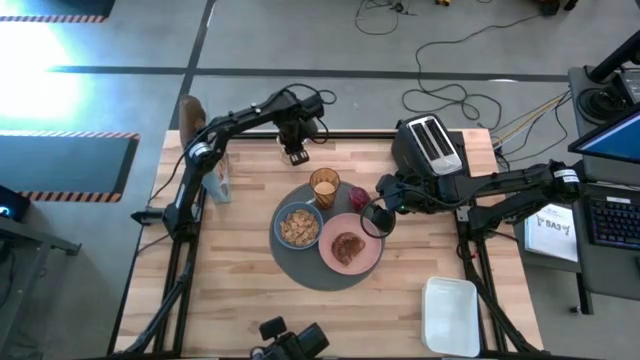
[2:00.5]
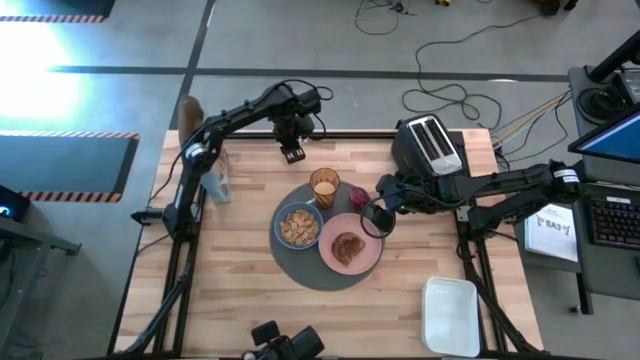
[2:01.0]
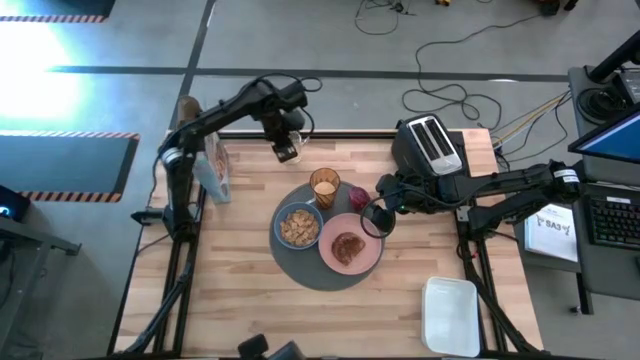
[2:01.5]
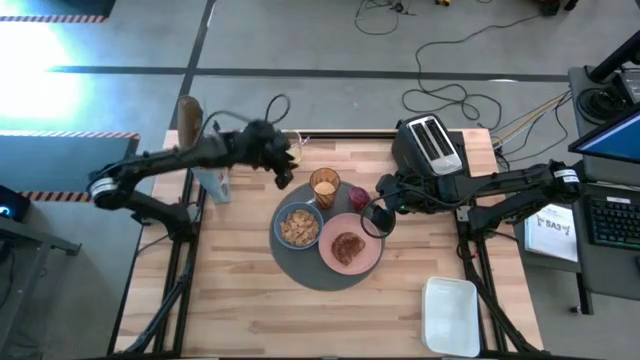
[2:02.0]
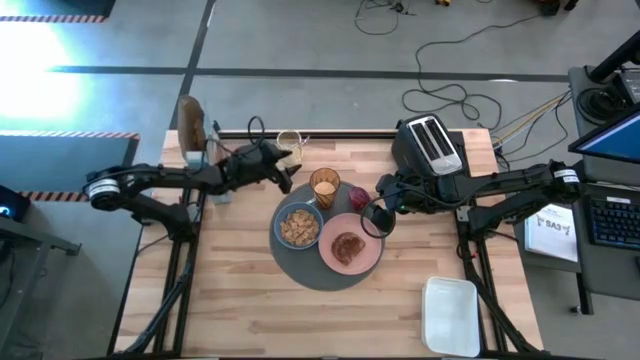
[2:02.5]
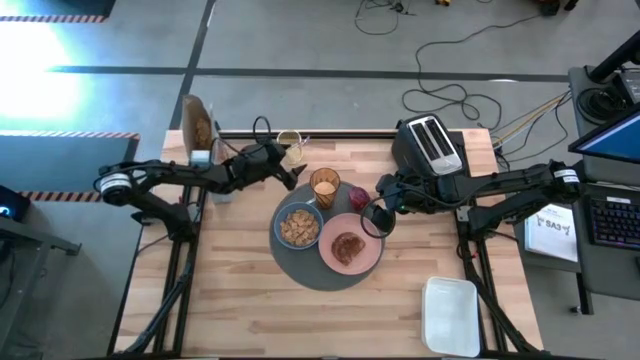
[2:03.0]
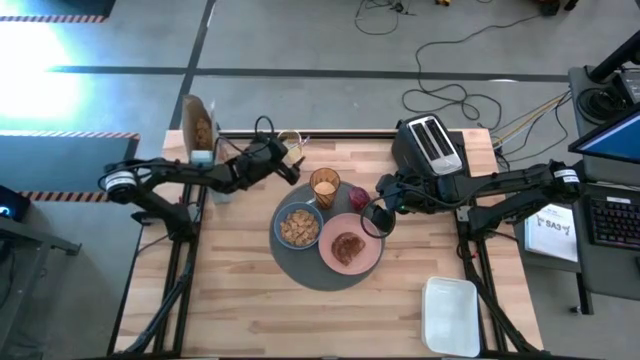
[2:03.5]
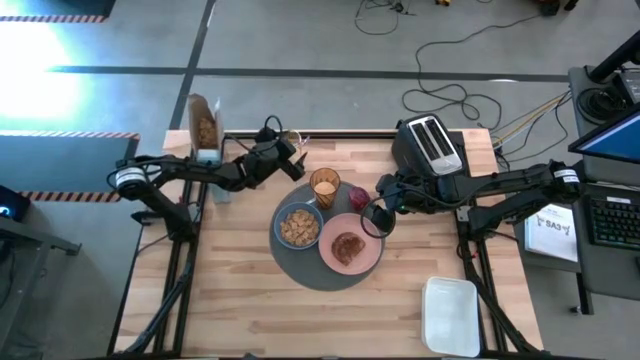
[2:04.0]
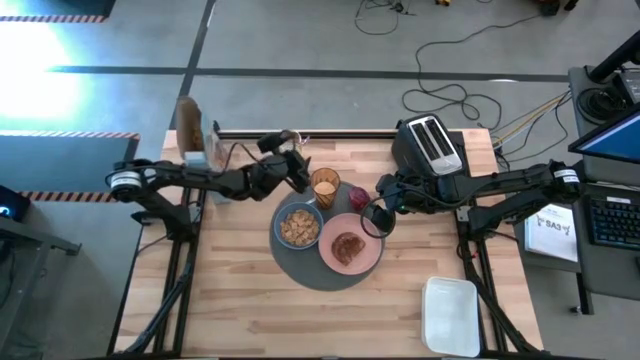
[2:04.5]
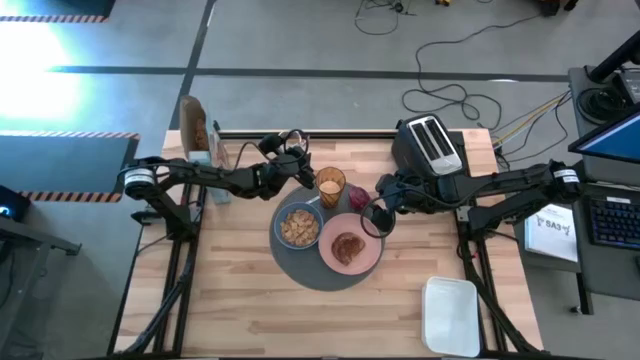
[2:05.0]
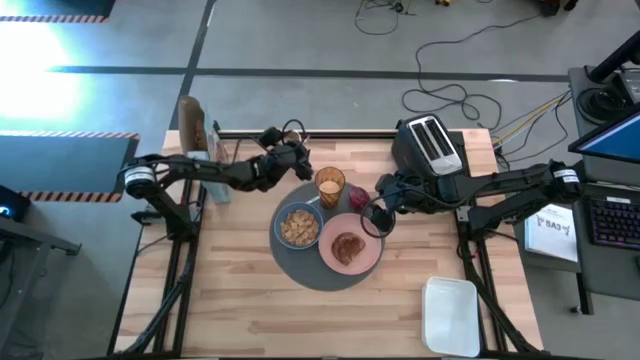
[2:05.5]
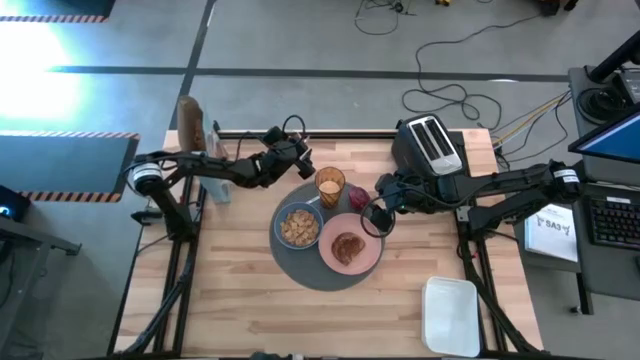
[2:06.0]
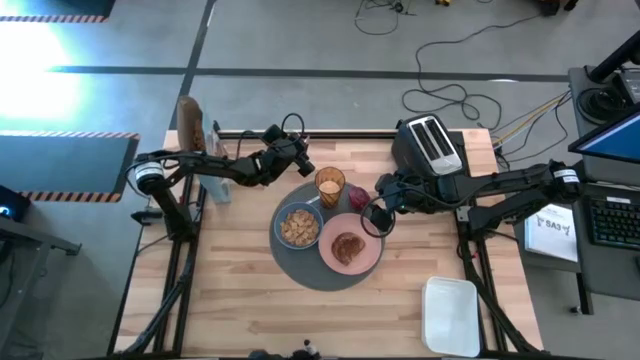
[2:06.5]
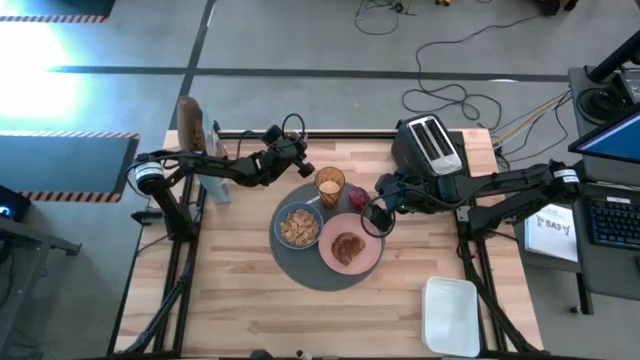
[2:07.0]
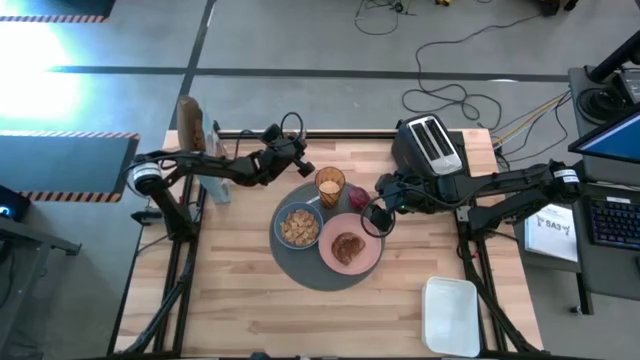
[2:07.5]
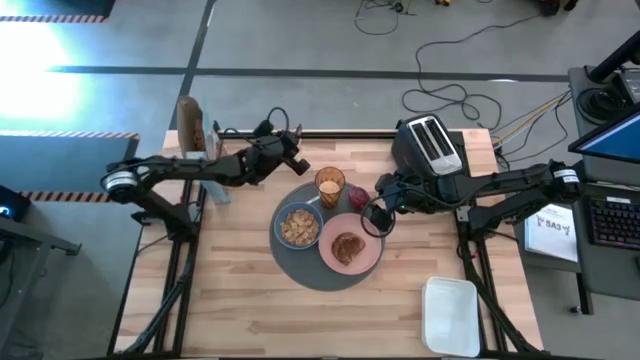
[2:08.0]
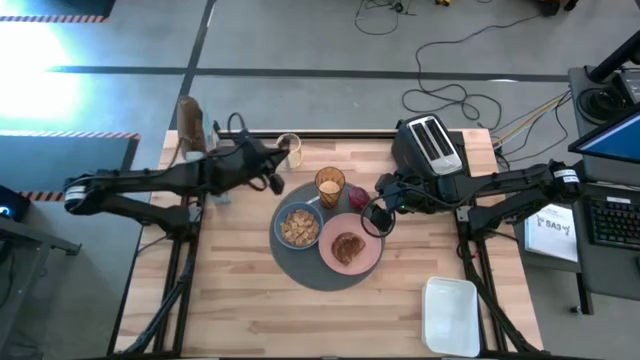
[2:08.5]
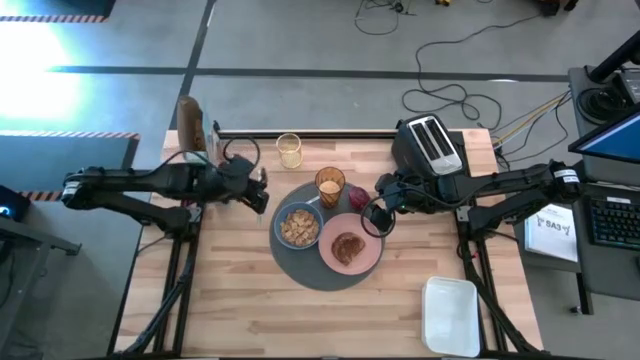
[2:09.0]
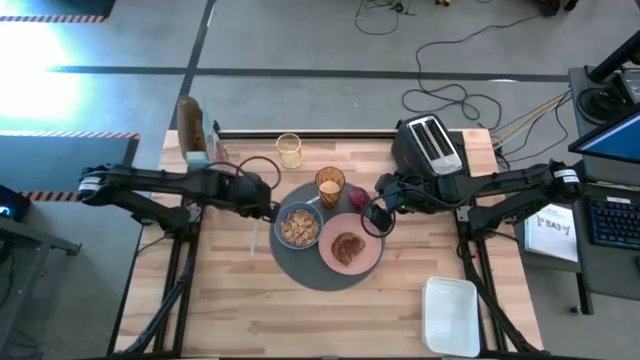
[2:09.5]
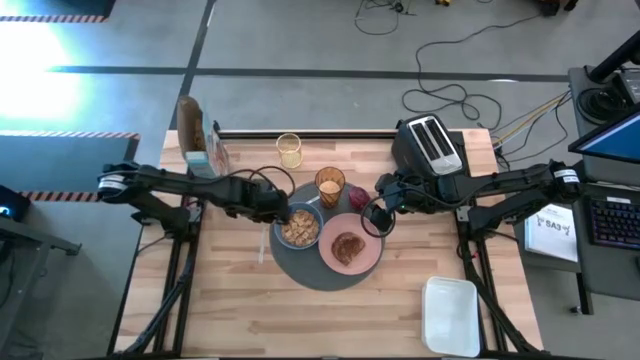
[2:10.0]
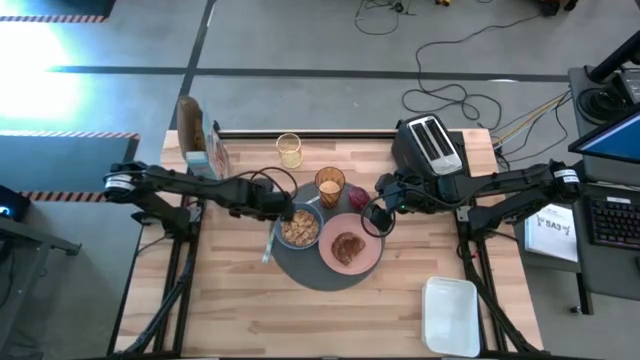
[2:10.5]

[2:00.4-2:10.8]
Task: Arrange a breakfast setting
Put the spoon on the left side of the placemat

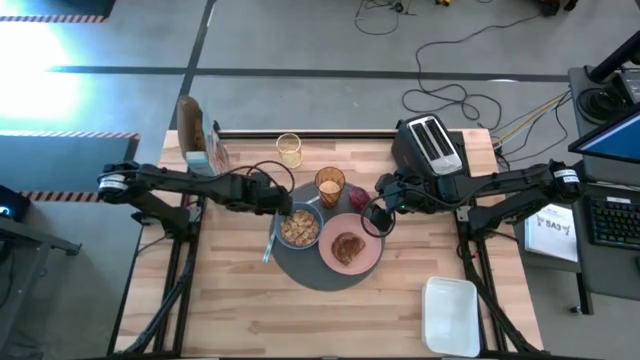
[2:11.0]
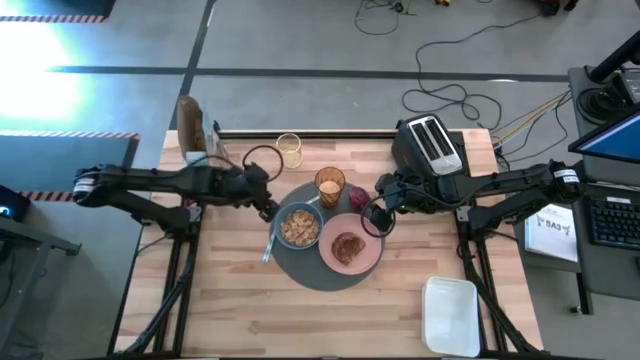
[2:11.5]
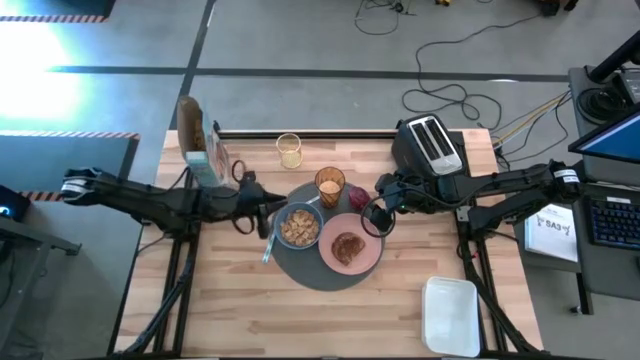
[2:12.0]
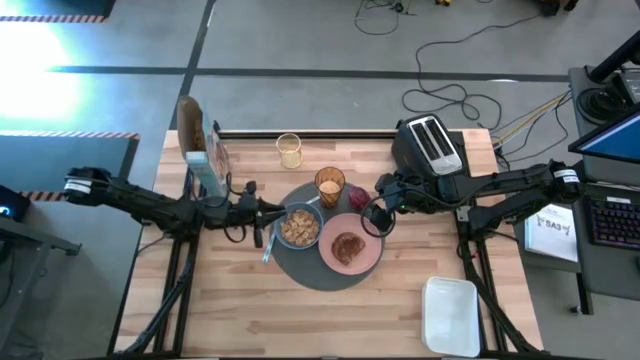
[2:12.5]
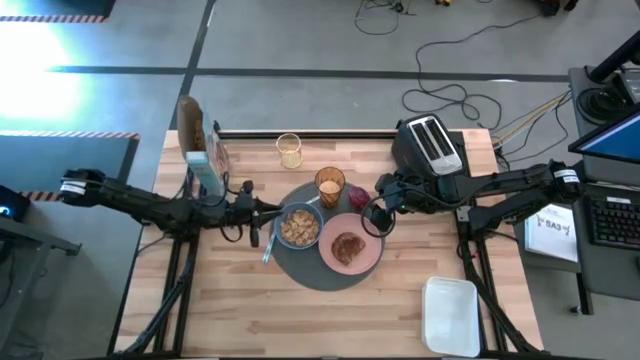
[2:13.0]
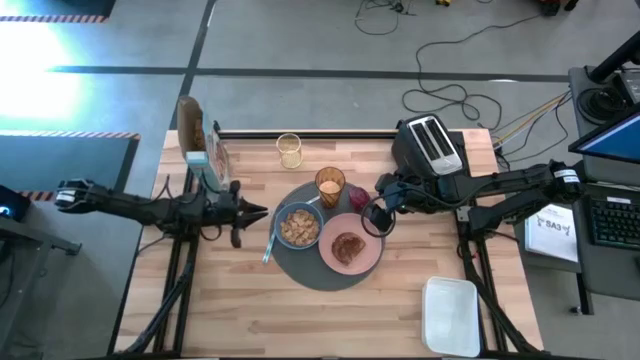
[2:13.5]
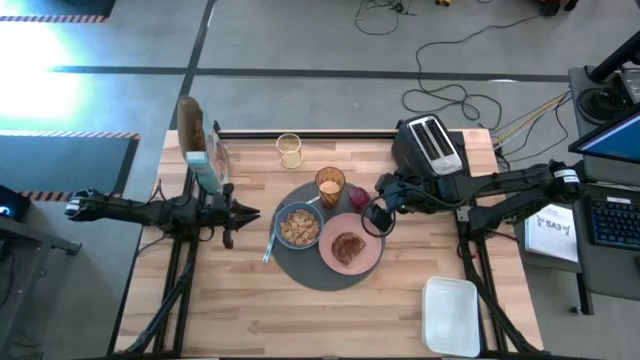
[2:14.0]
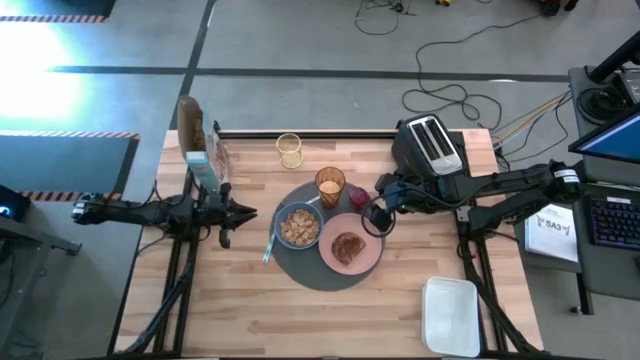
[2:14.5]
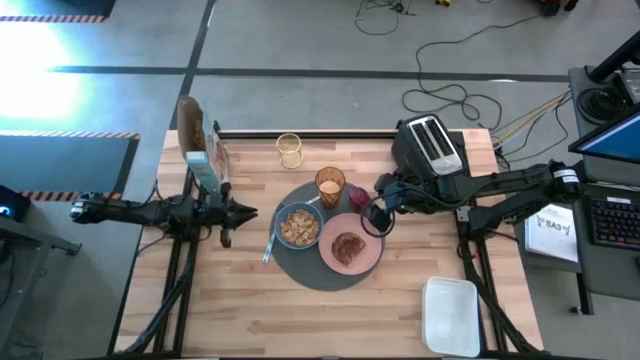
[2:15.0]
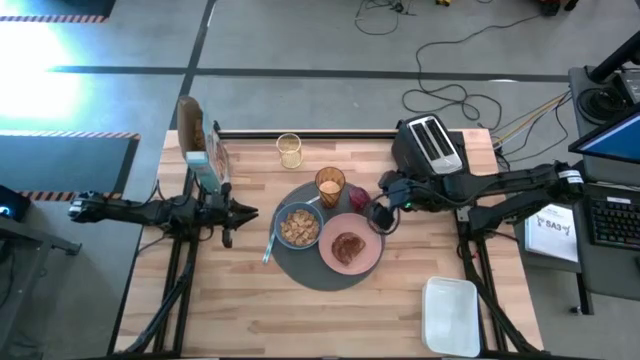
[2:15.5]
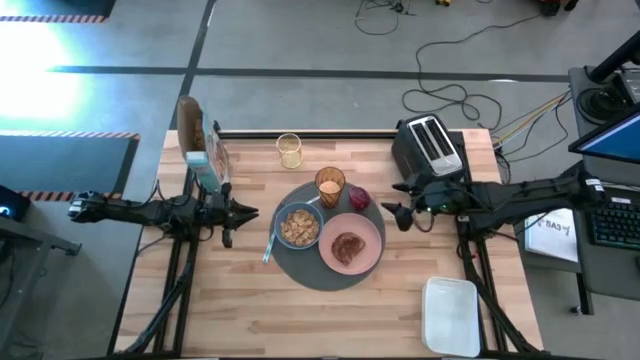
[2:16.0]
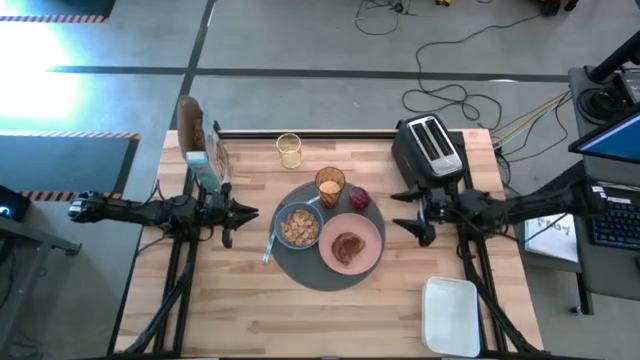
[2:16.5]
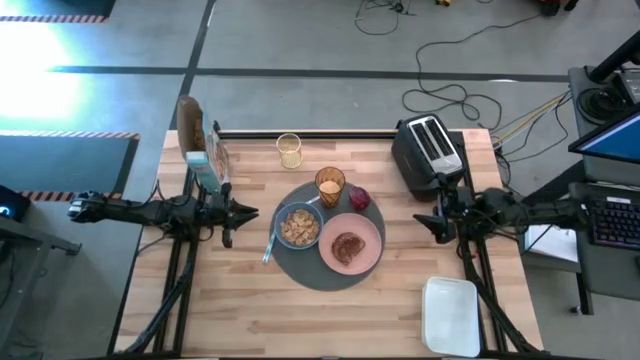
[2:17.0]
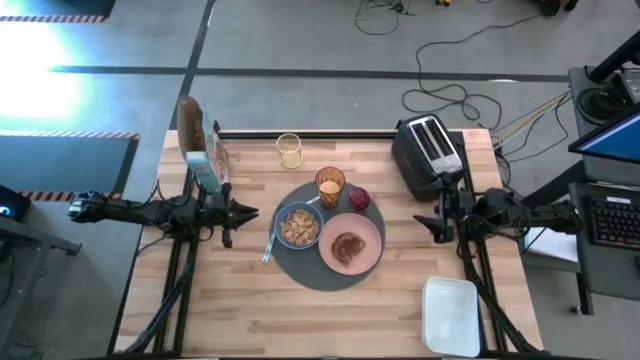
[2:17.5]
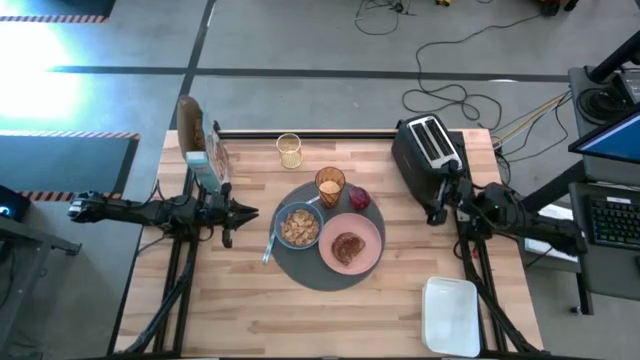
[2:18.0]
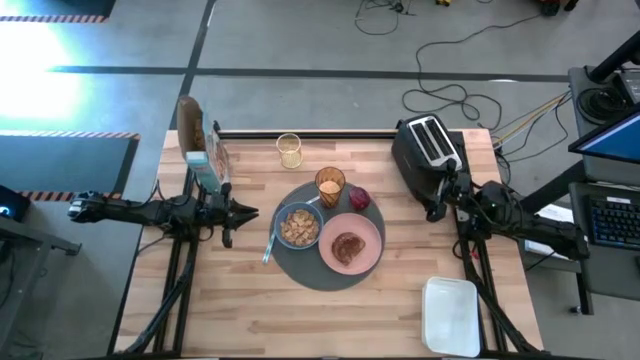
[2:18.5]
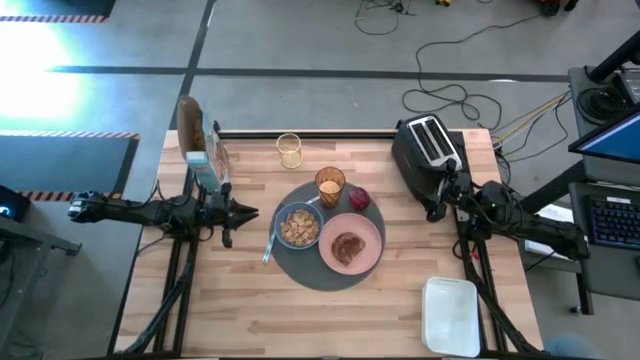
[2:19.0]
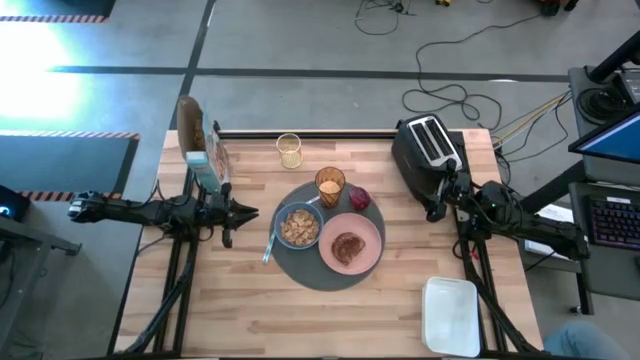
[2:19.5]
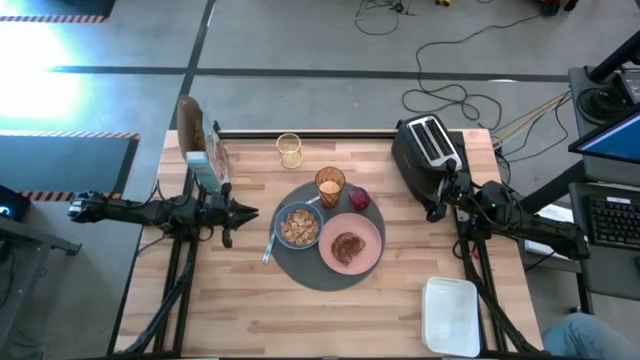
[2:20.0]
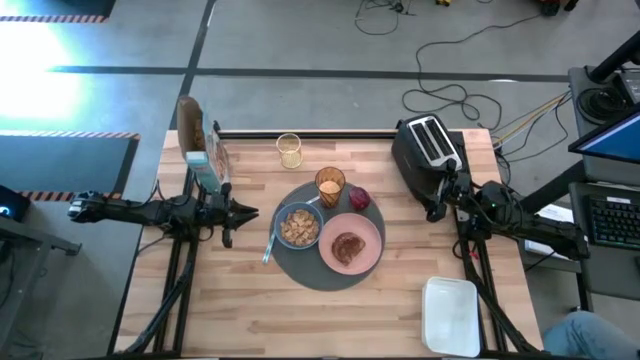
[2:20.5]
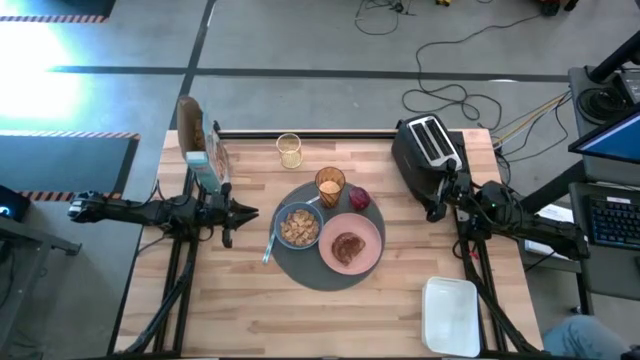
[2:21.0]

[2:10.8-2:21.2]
Return to Home Position
